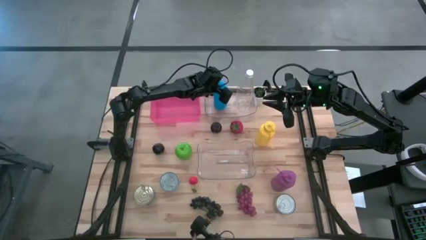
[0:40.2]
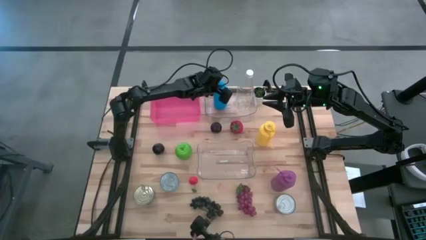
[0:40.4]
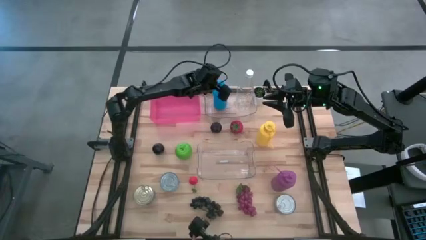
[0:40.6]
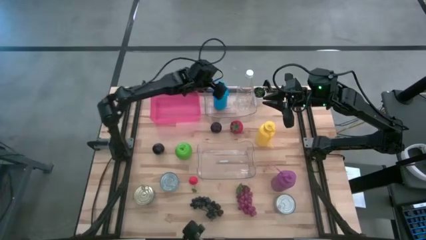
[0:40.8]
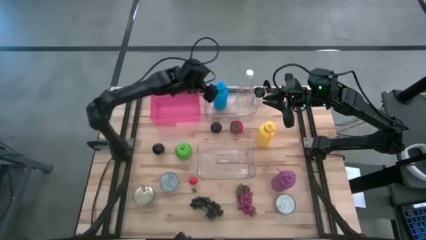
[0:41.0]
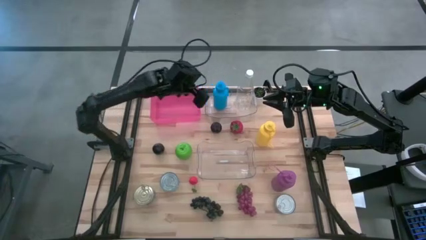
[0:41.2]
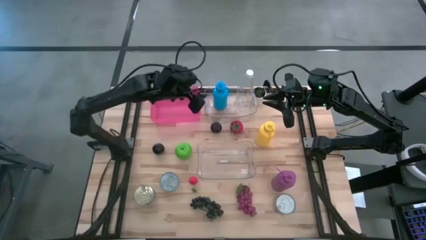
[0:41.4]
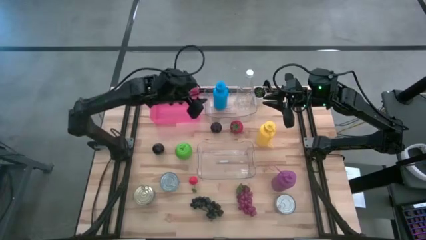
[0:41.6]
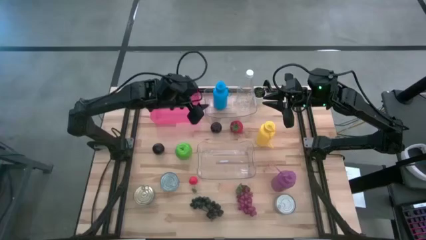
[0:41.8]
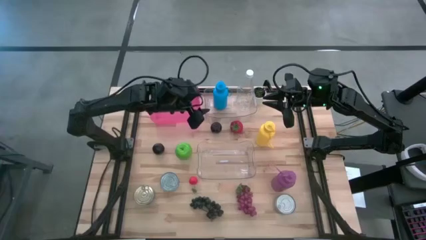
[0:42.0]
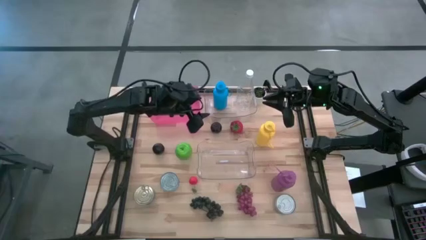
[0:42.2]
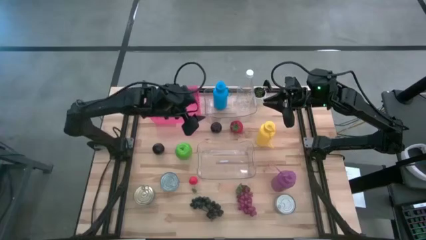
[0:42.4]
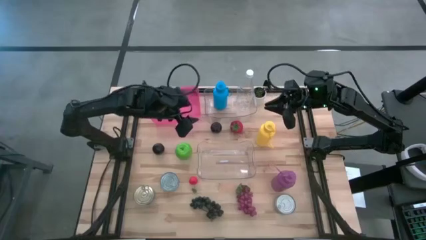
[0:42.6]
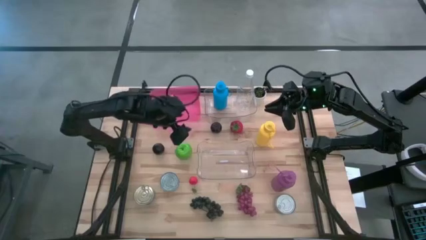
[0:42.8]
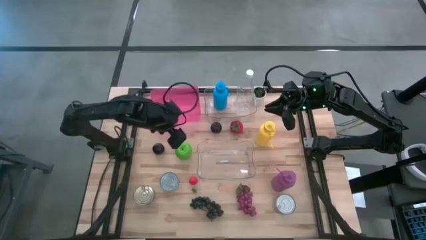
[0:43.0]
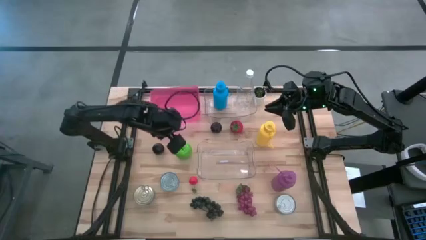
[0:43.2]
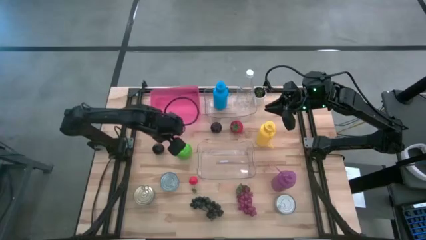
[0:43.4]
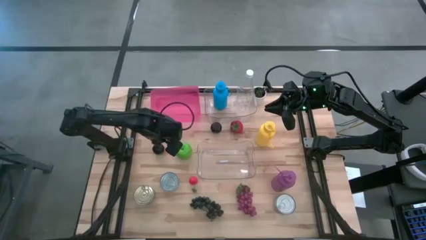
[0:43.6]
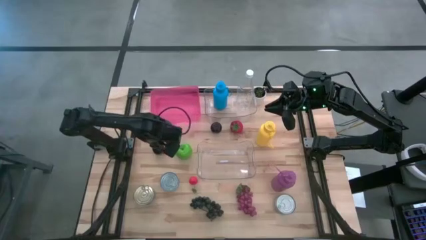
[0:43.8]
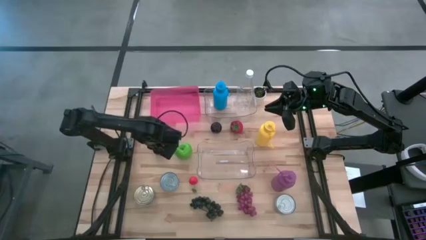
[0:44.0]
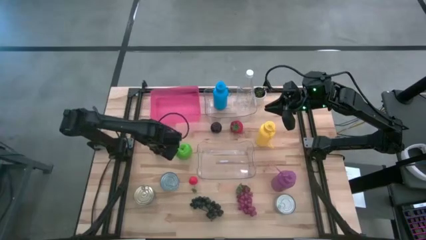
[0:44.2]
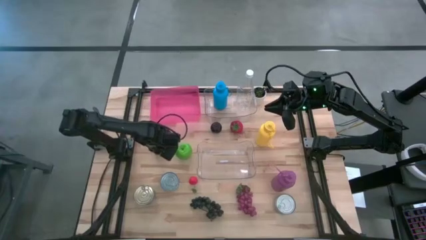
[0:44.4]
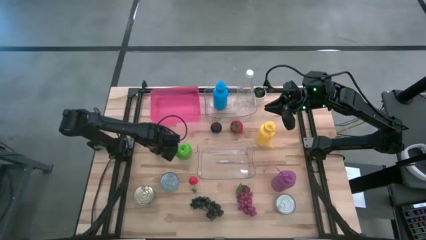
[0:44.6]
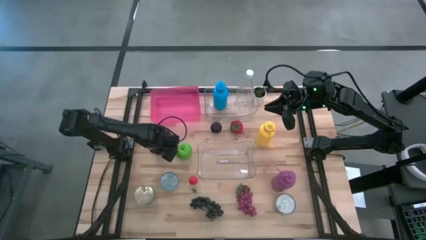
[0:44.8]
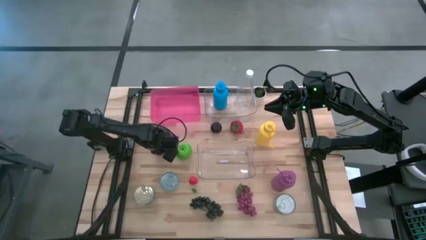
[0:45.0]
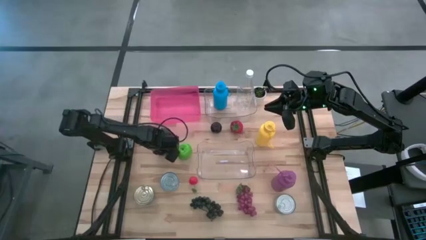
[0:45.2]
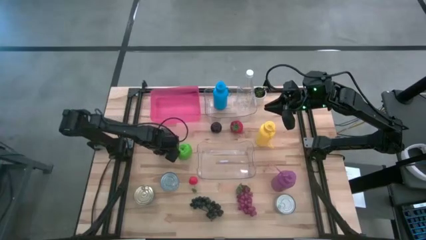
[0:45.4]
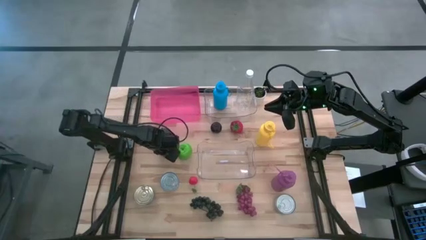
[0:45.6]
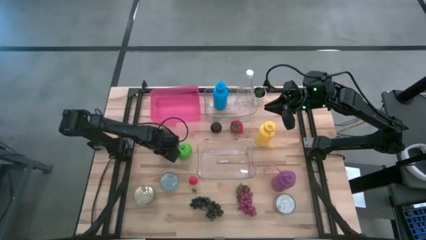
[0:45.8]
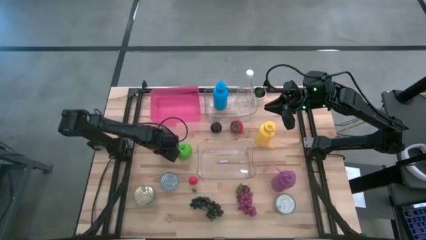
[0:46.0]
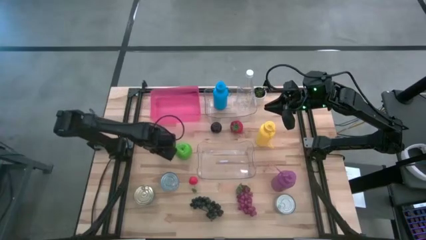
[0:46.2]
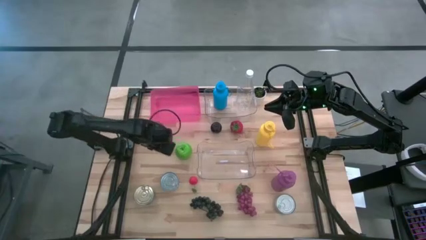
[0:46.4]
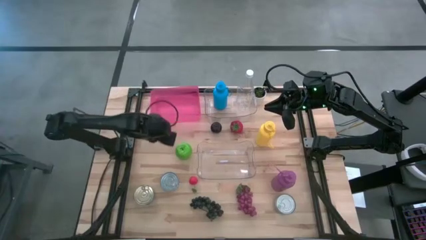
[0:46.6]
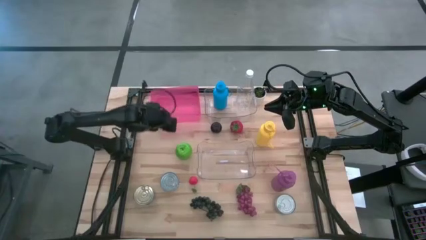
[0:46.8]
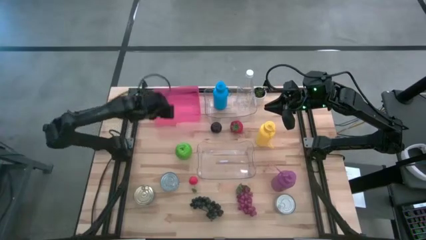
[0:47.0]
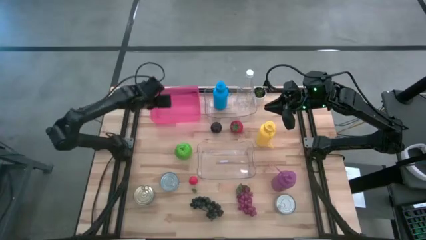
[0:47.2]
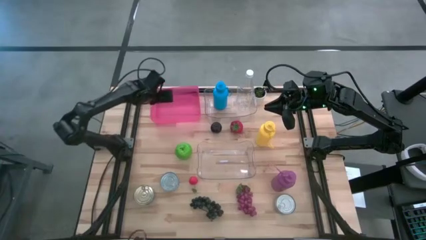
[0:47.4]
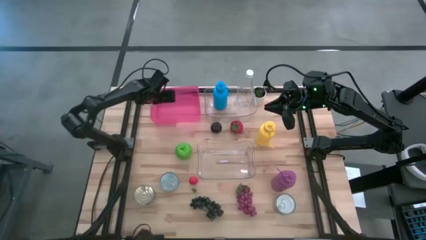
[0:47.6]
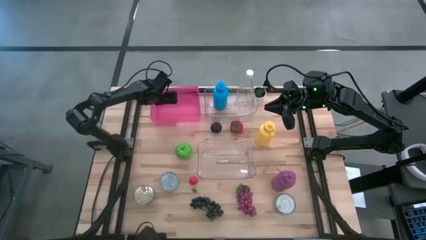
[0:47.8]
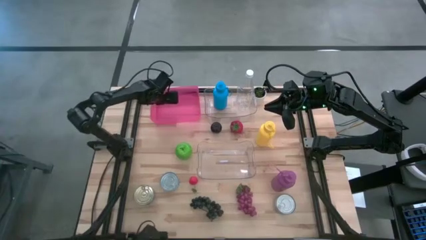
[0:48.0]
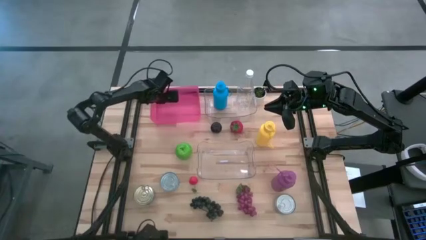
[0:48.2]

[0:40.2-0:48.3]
Task: Pick & Place Food Item
Put the left plum into the pink bin

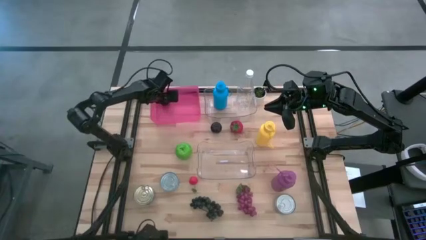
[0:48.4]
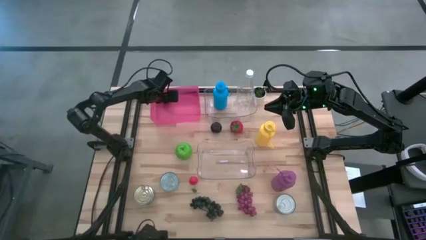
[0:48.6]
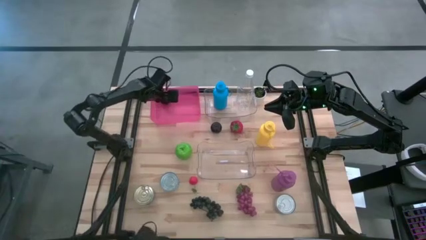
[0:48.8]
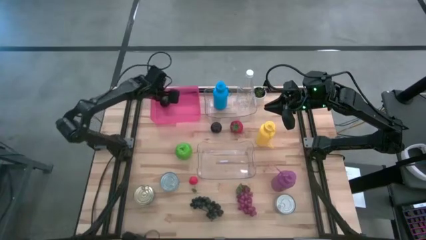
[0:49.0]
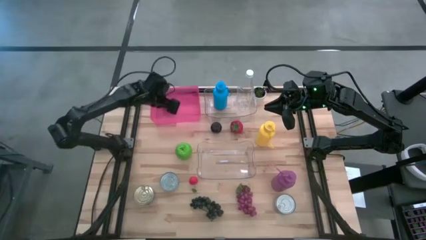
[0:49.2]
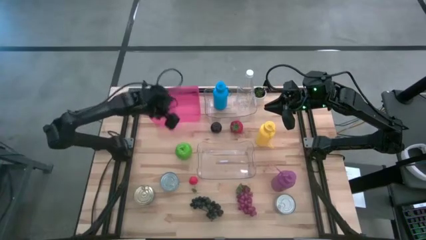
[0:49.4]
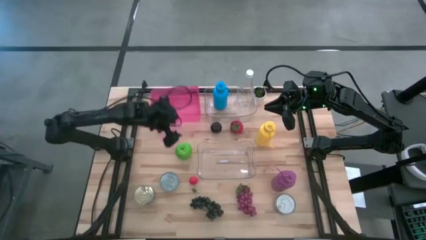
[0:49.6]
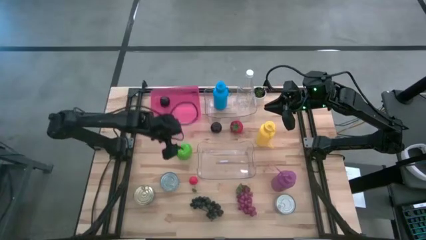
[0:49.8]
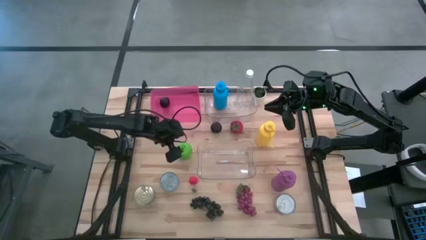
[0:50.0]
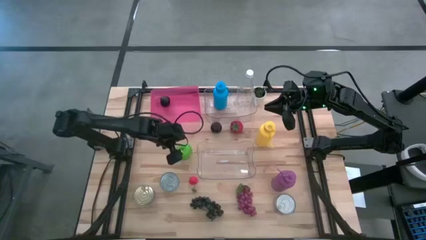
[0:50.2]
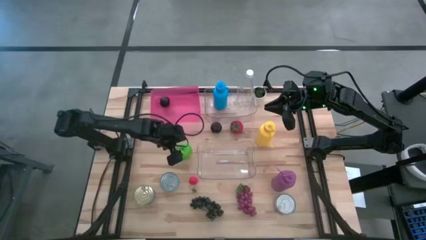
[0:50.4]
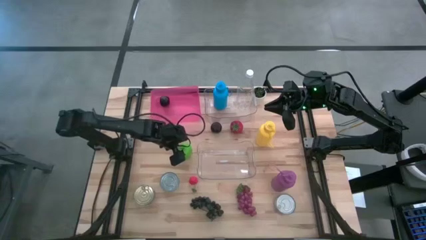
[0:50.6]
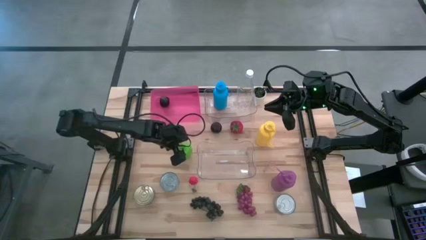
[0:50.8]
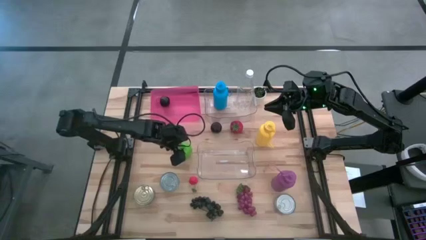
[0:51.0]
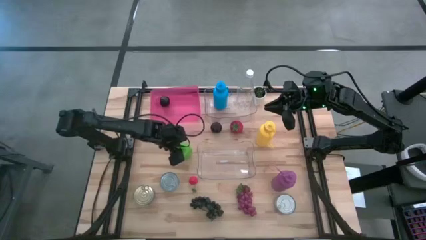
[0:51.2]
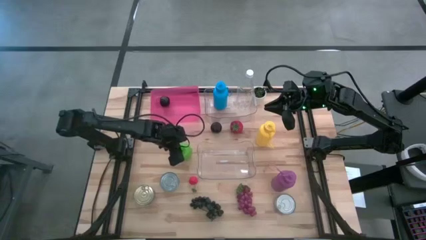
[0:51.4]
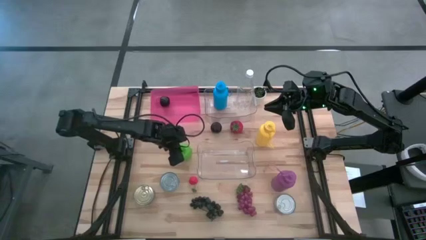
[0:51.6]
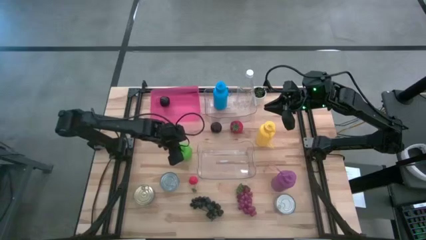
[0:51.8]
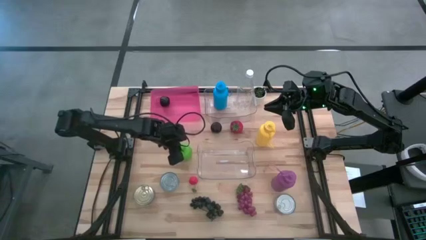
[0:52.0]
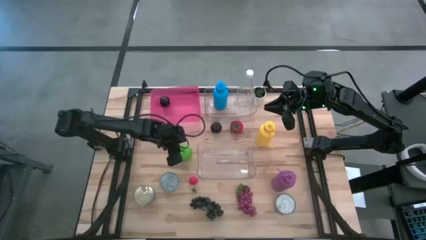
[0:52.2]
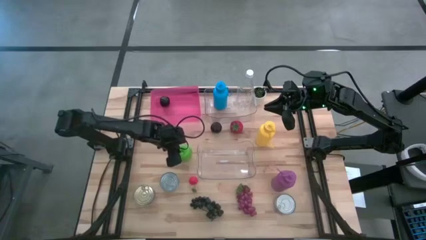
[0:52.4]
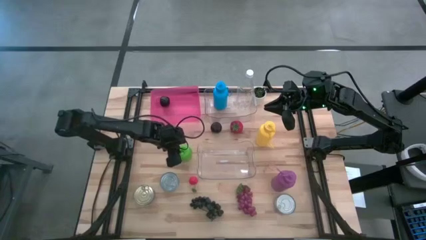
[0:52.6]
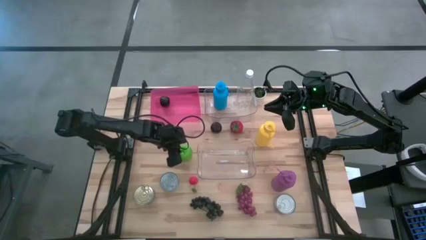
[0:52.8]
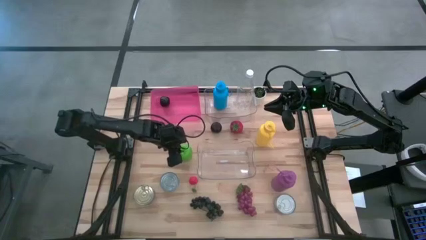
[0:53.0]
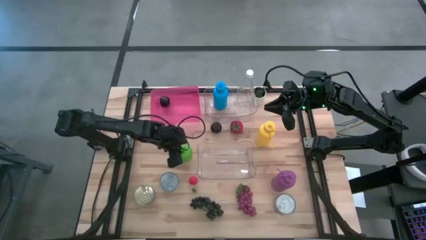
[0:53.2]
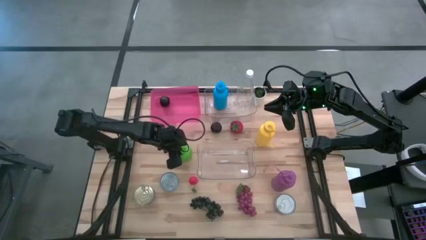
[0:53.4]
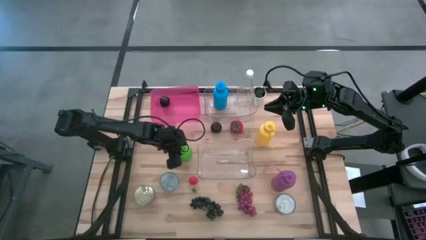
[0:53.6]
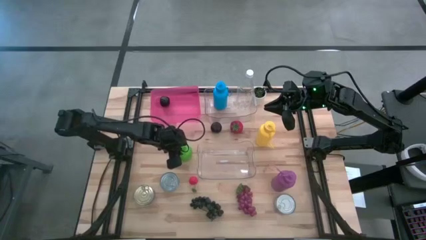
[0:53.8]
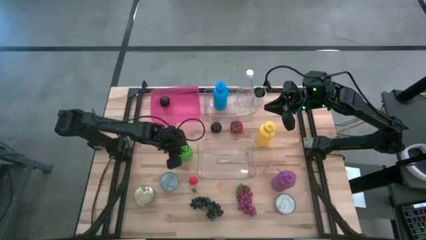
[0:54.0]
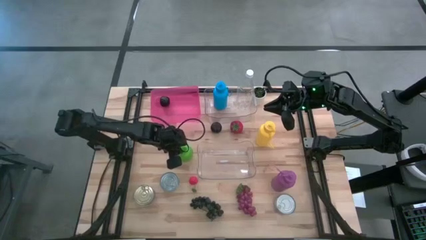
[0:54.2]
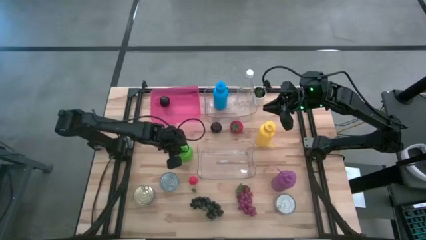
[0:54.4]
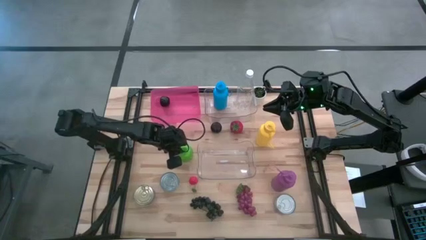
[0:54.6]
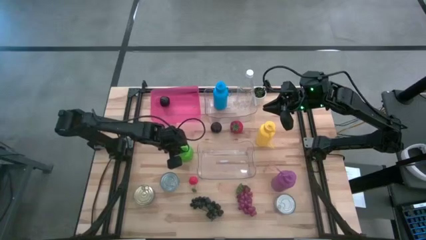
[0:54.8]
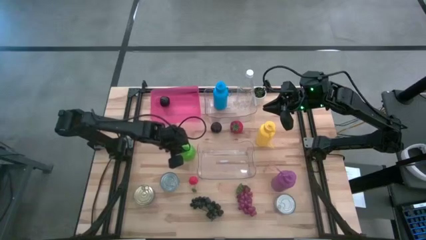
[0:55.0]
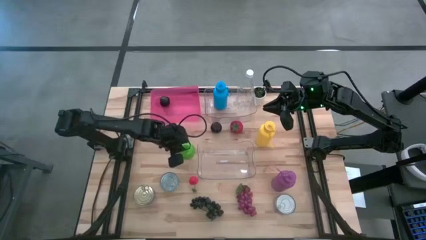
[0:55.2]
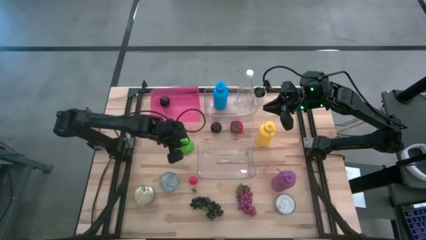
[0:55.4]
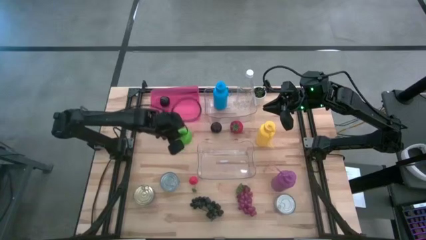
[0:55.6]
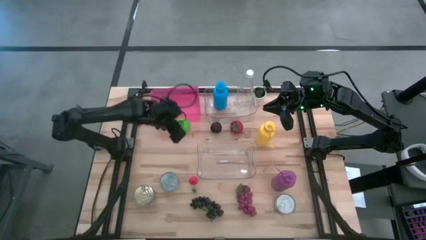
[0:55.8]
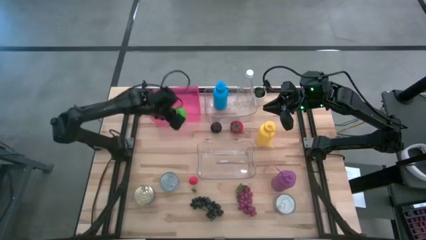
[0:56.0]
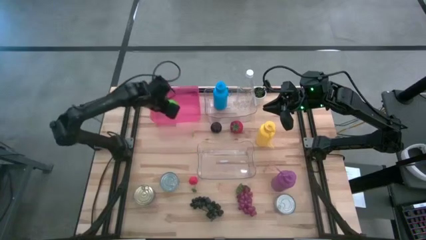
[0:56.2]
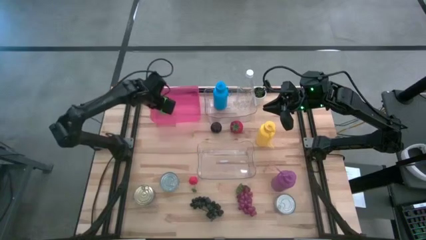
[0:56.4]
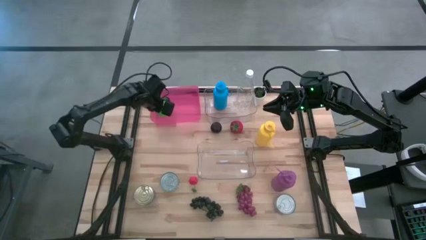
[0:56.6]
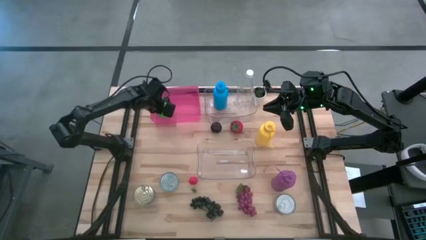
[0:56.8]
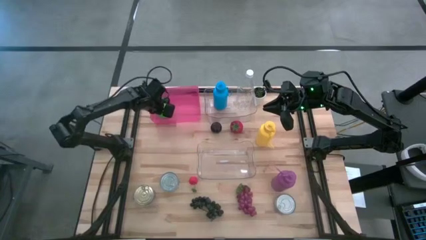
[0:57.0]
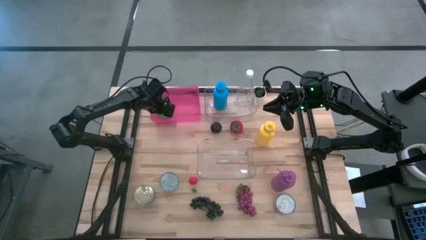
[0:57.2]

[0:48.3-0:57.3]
Put the apple into the pink bin
